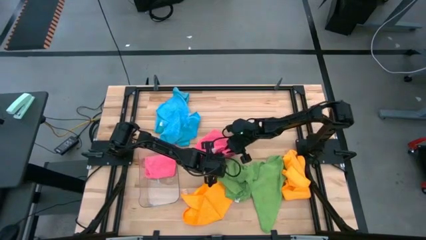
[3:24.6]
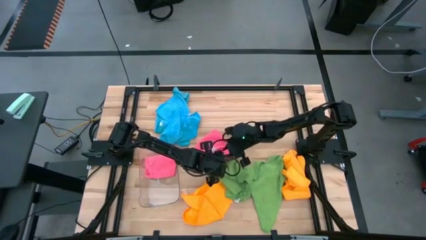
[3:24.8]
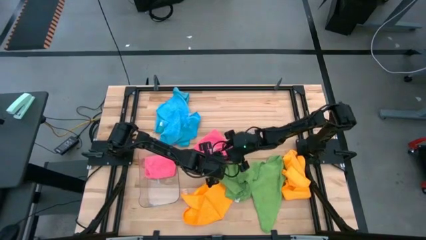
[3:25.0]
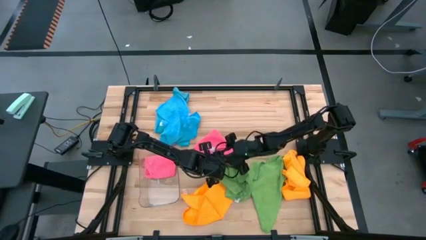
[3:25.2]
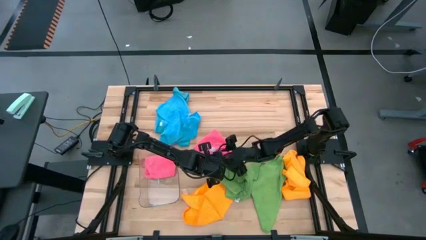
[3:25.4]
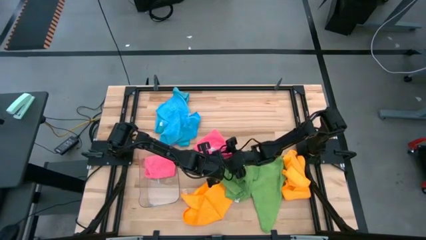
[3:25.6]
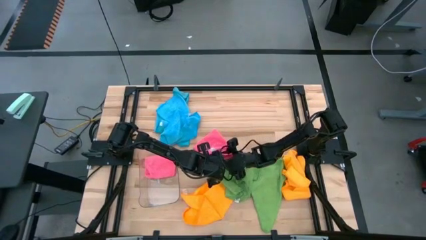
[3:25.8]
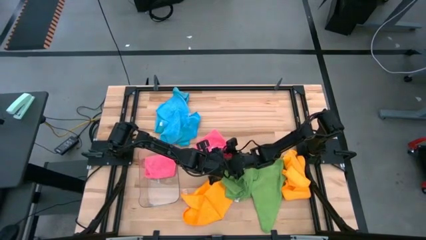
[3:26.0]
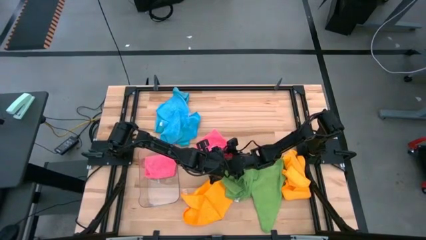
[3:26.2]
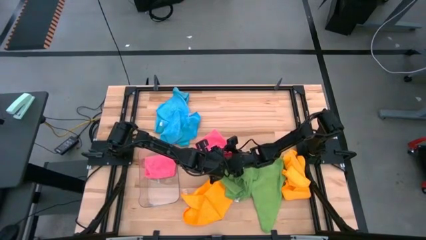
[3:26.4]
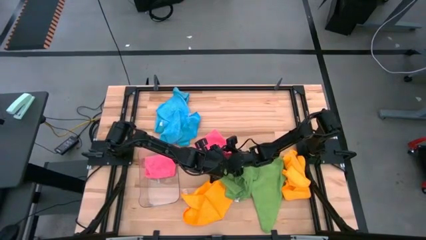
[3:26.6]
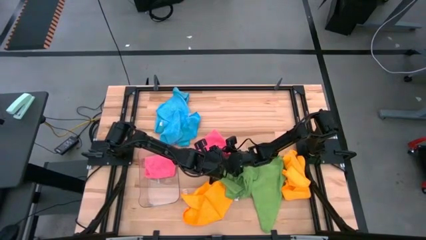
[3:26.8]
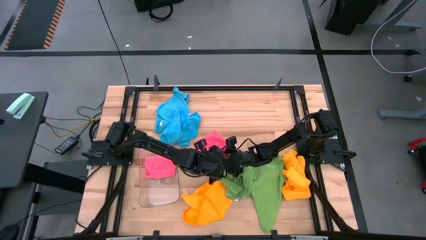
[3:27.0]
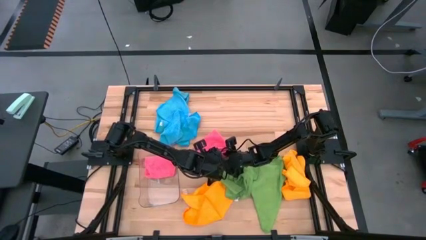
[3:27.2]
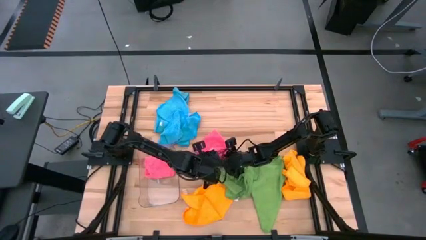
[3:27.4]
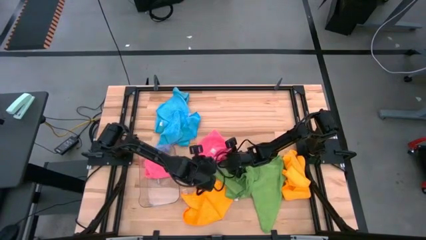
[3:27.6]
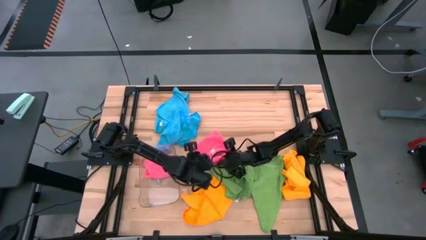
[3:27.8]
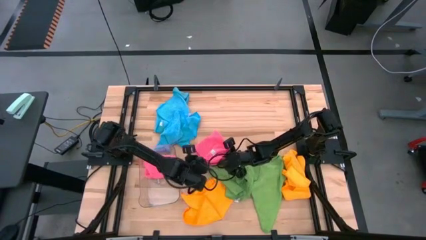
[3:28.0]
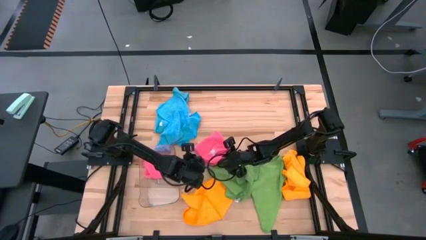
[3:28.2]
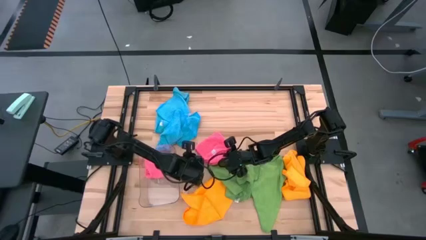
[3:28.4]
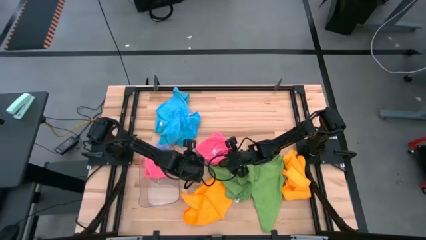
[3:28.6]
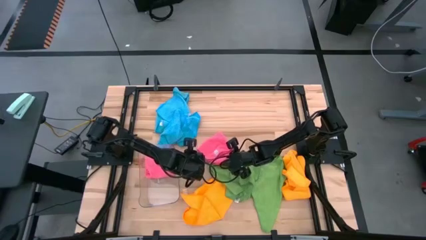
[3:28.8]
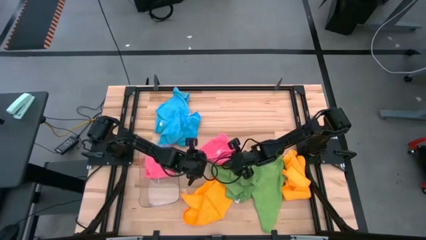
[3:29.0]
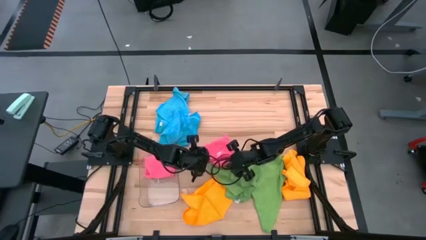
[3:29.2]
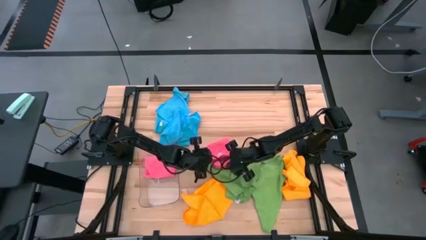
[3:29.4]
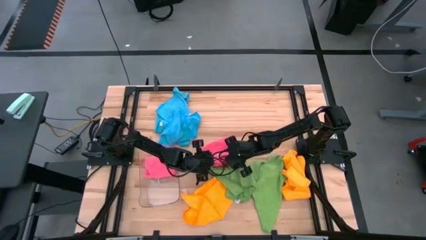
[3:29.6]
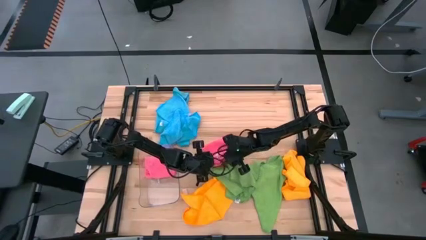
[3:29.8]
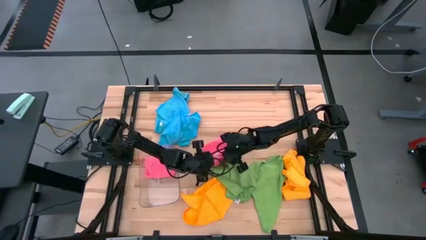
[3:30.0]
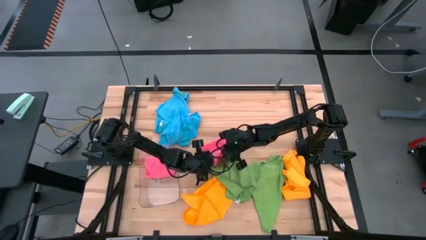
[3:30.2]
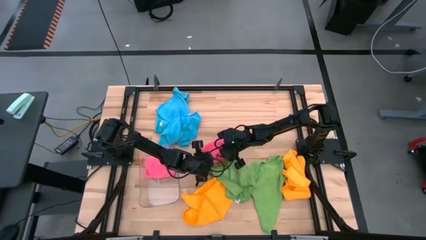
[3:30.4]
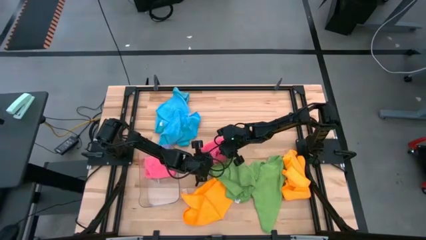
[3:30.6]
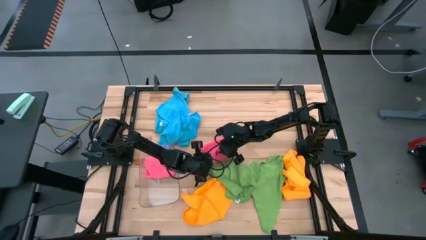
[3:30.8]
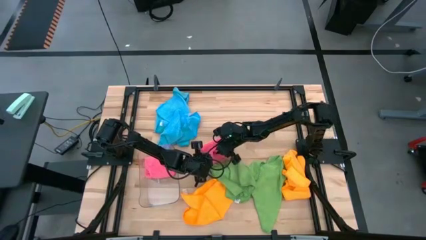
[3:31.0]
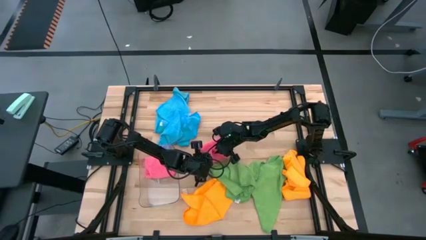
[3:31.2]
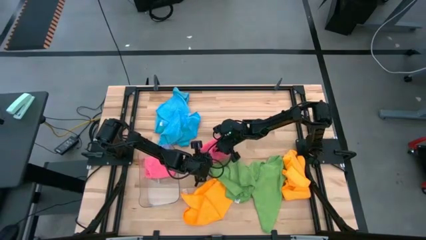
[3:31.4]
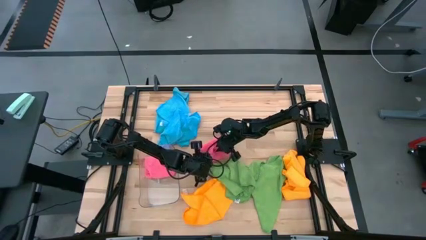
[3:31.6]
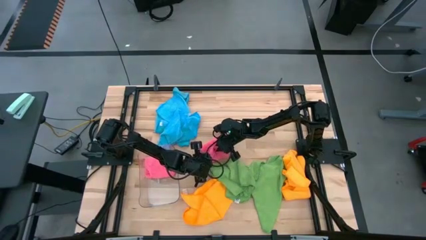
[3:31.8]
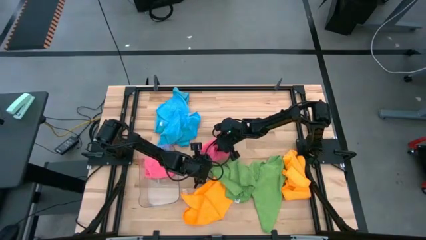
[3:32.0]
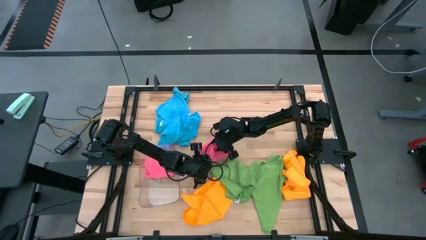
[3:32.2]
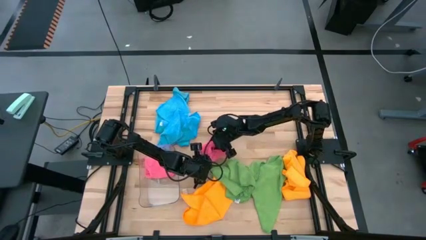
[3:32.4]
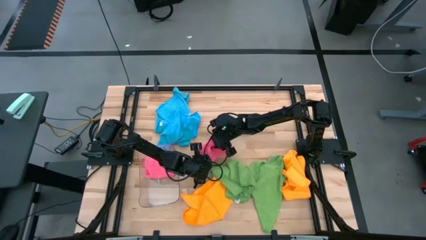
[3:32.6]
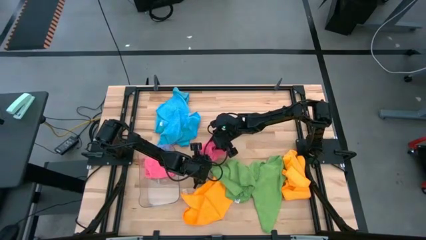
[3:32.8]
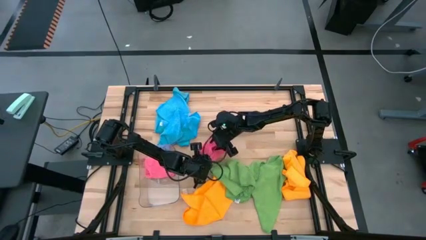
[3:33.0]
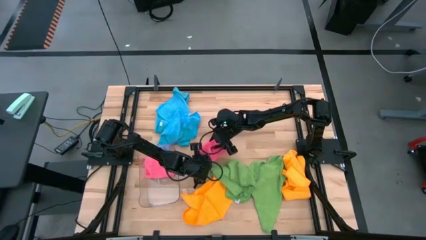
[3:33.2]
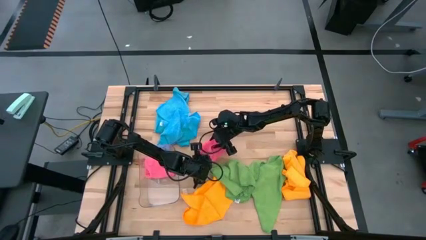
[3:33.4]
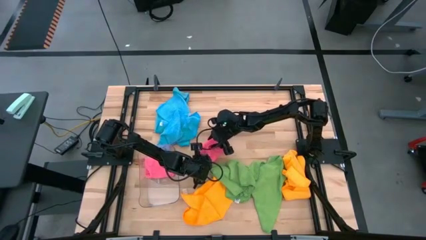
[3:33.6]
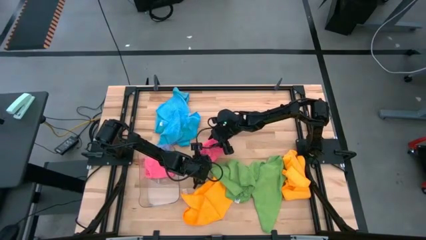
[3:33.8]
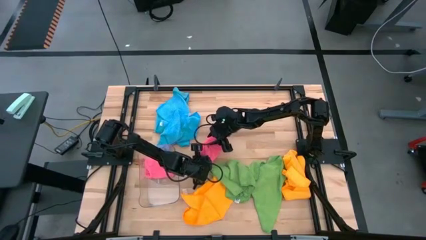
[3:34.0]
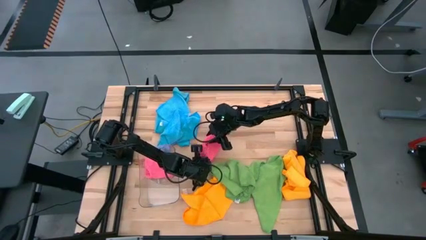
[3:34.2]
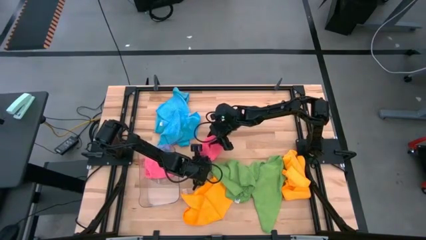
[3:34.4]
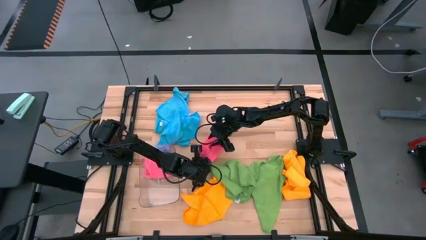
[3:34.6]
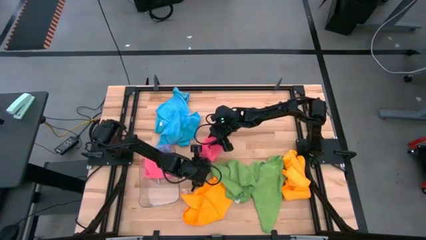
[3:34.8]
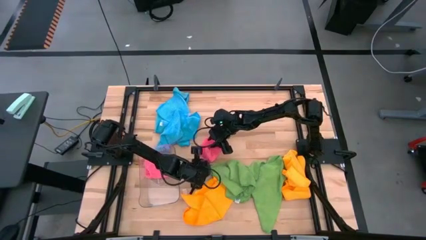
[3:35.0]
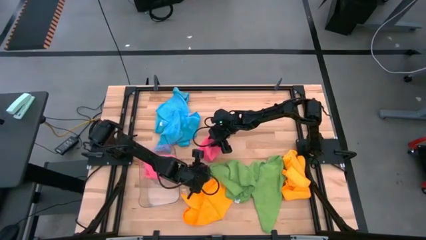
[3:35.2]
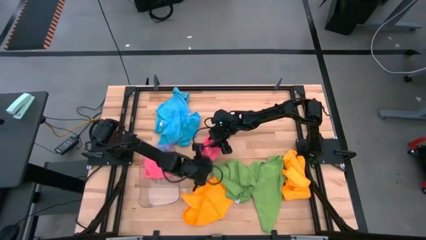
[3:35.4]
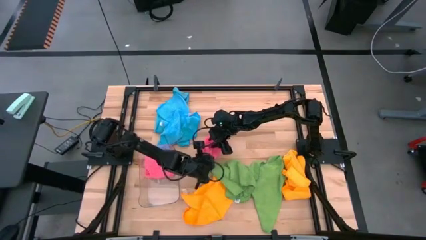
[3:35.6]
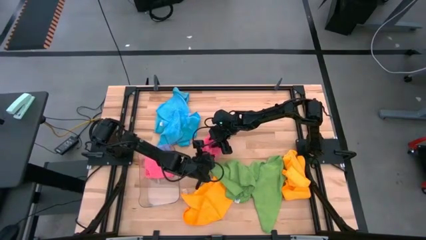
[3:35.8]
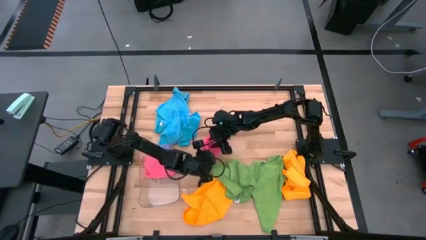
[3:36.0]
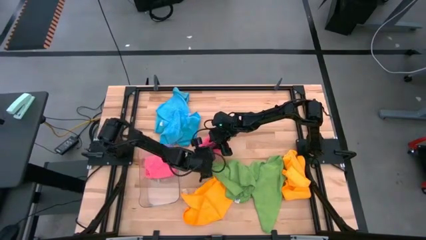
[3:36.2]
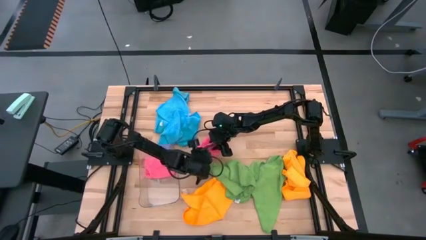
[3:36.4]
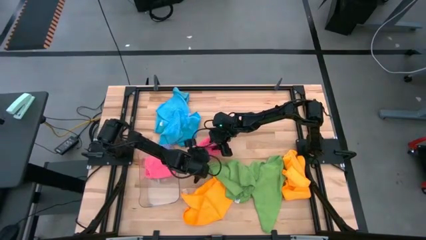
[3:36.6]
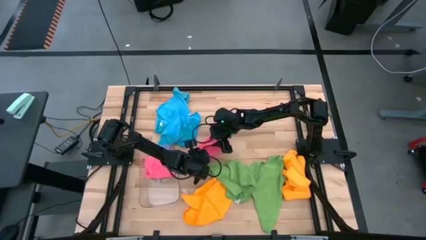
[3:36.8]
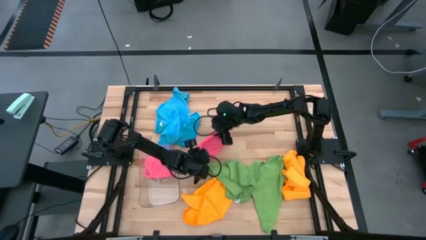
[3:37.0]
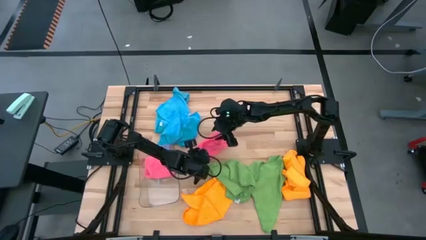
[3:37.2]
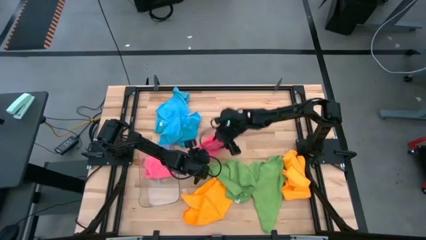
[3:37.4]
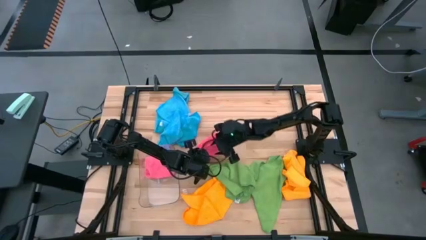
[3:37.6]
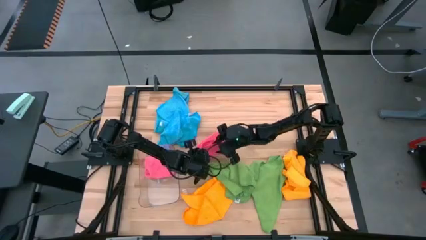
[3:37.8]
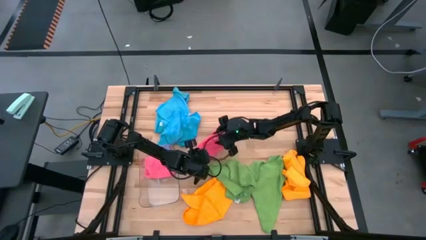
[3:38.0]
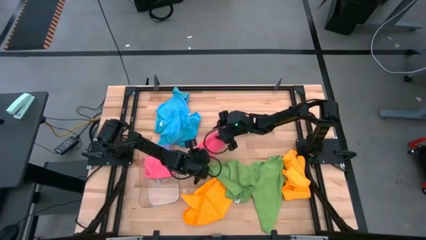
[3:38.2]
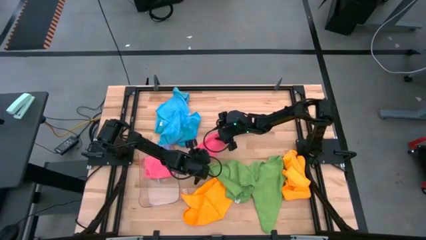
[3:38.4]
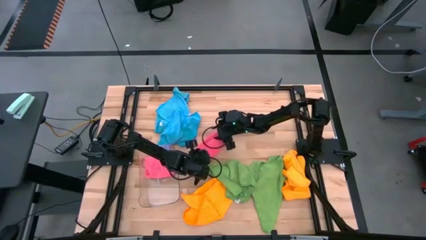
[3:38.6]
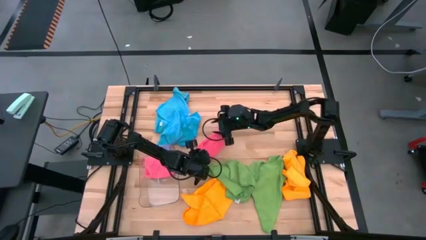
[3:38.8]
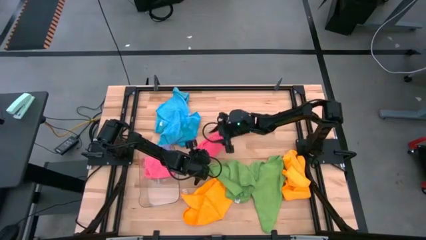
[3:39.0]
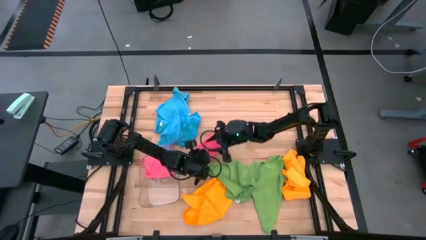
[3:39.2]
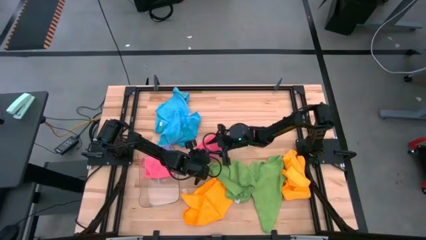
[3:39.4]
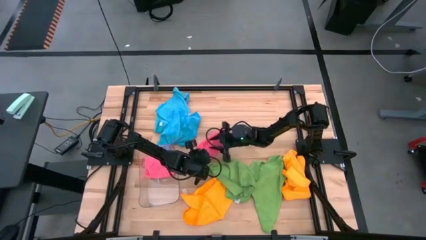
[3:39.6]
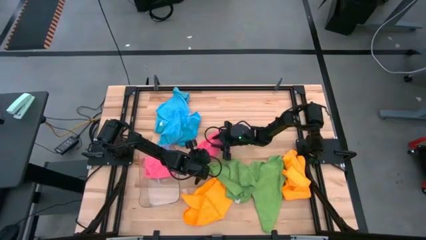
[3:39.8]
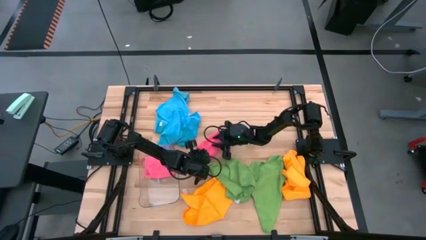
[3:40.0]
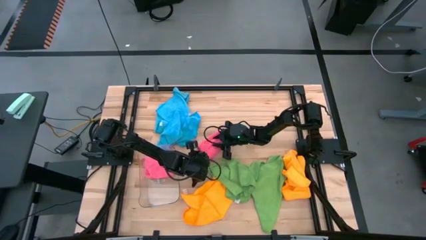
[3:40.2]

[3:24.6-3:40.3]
Task: Fold microfiber towels
Fold the pink microfiber cloth
